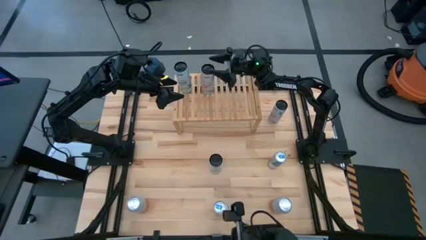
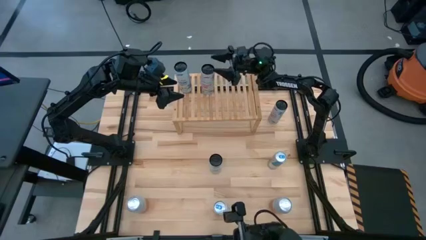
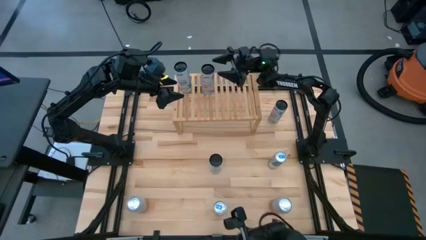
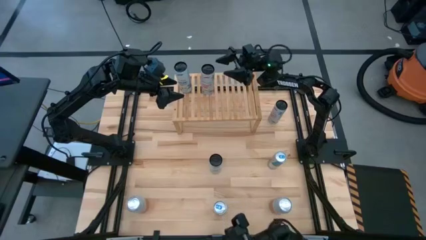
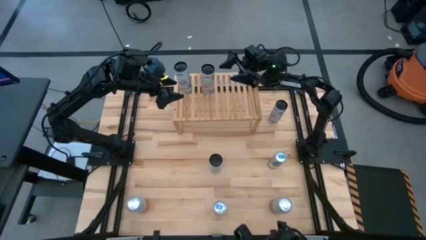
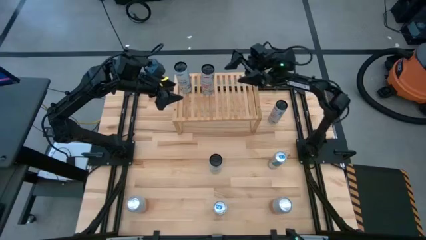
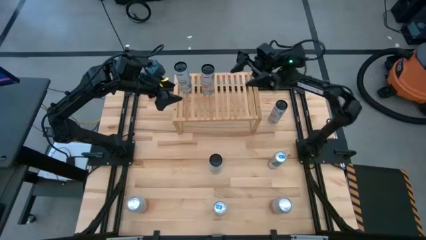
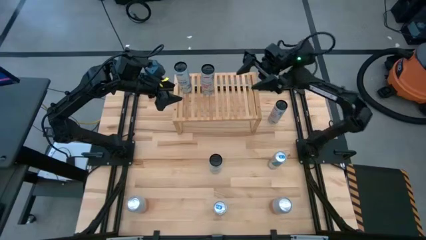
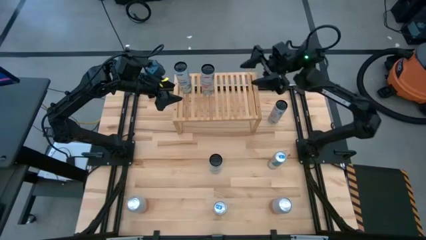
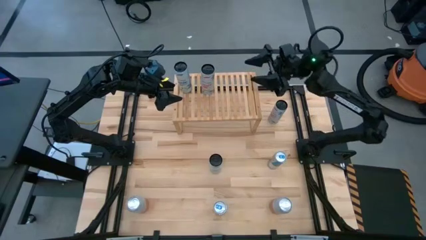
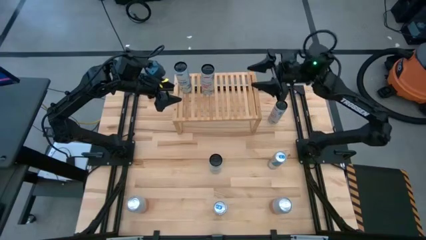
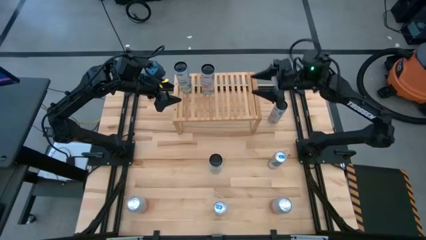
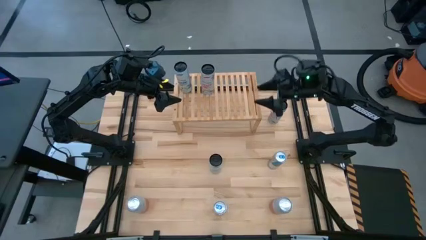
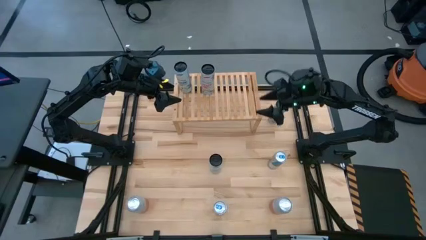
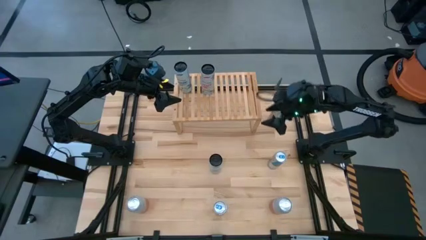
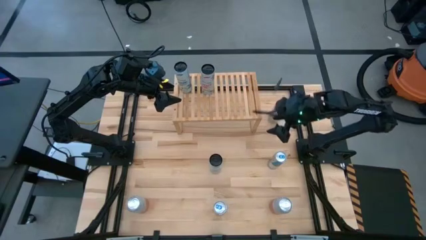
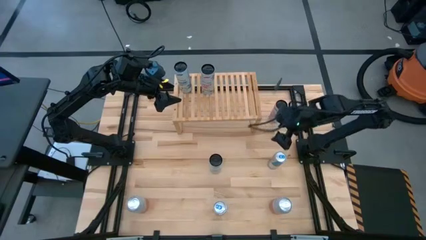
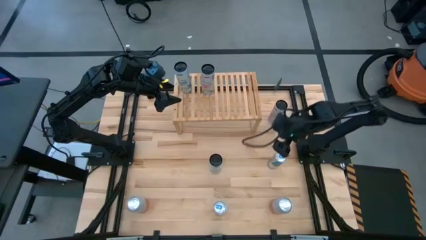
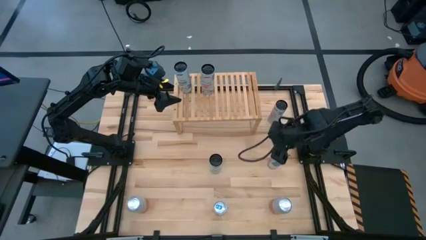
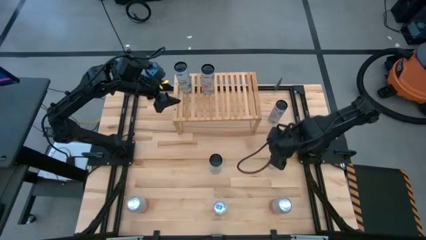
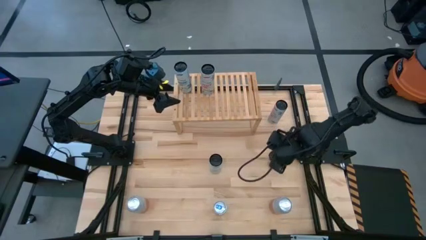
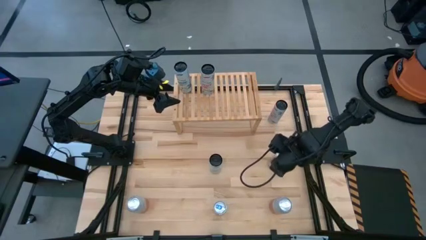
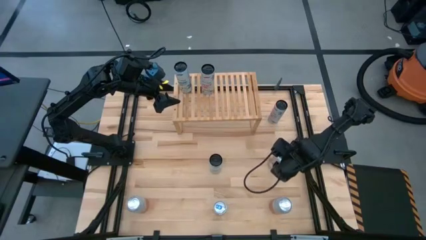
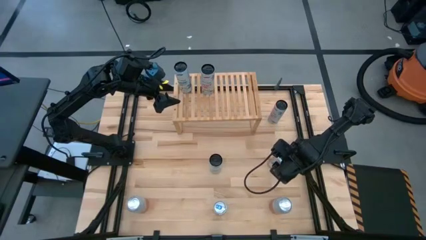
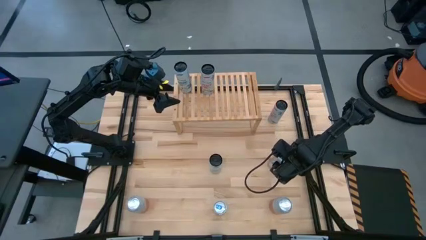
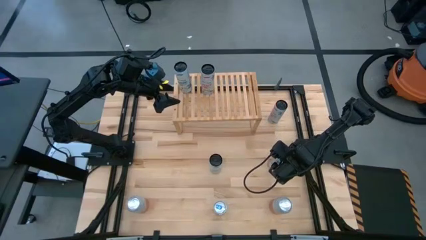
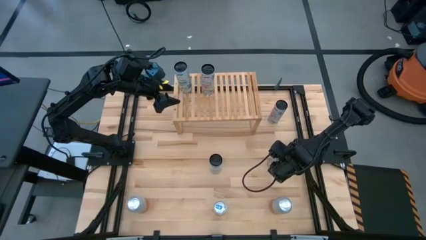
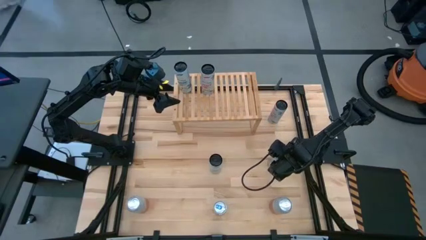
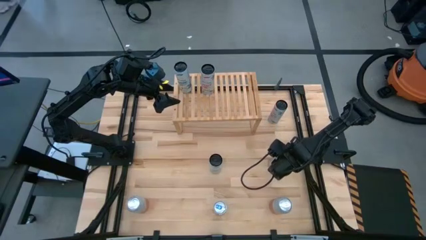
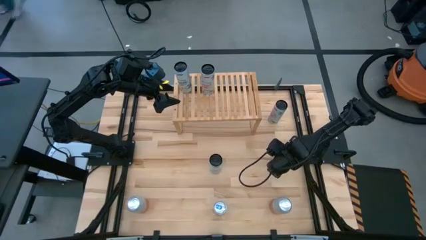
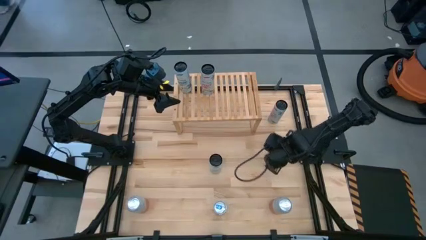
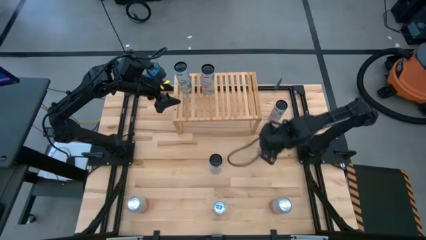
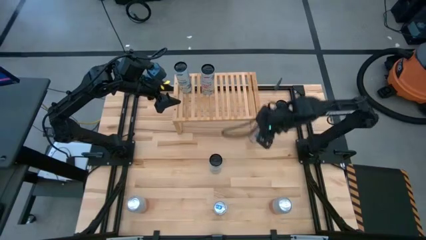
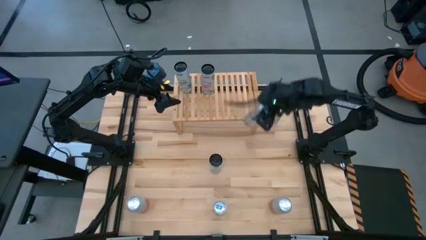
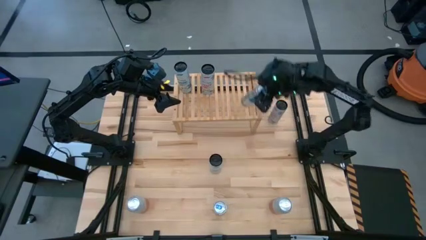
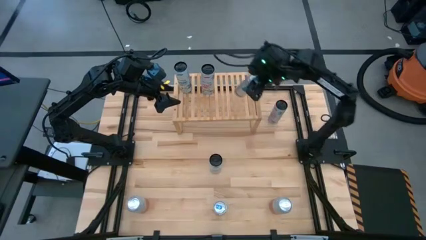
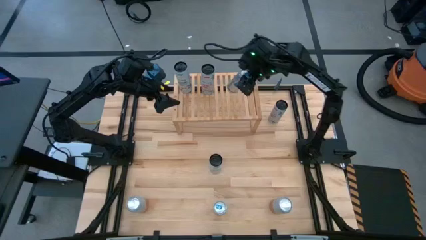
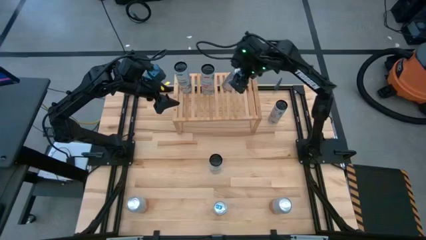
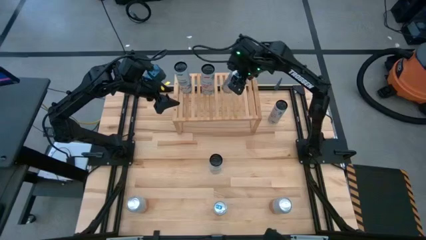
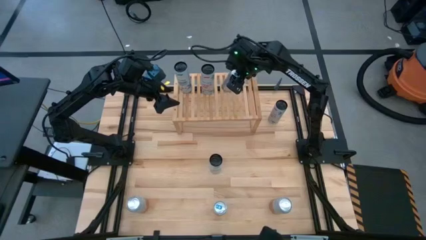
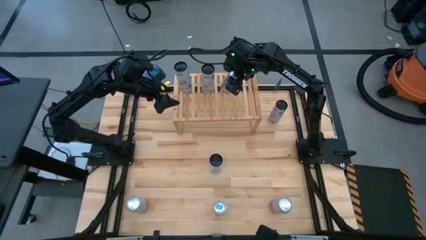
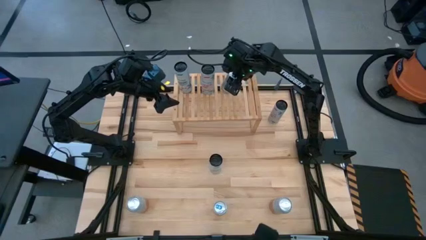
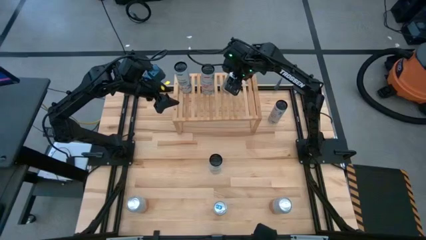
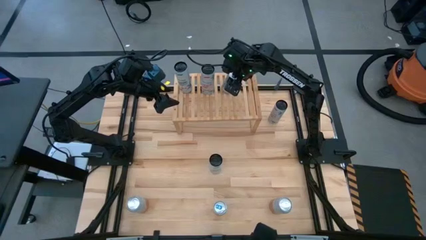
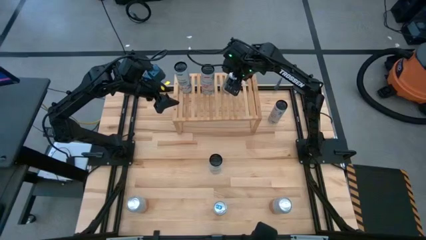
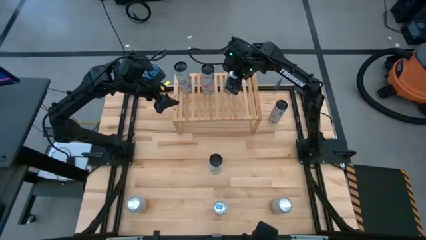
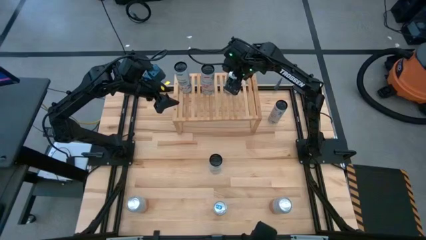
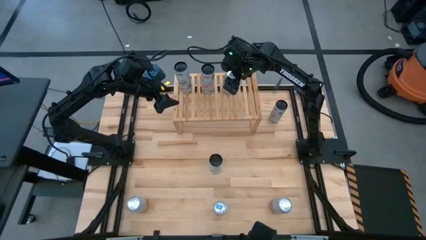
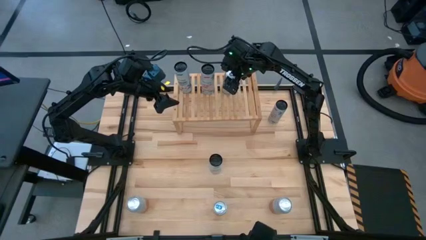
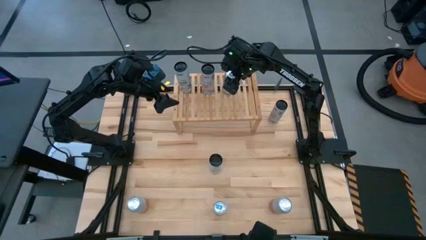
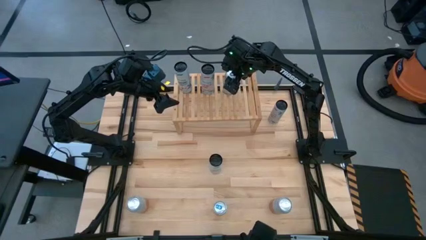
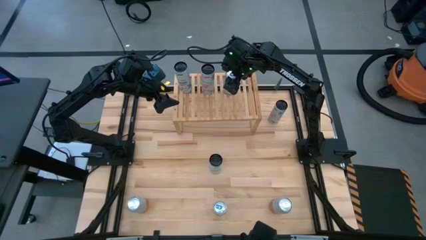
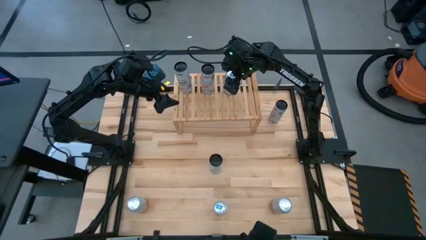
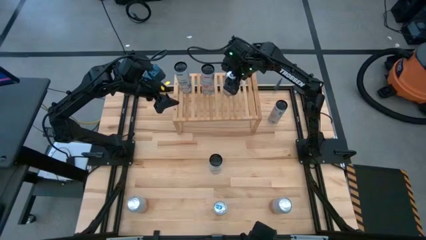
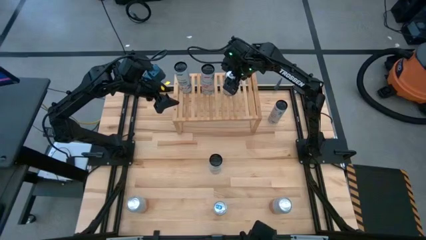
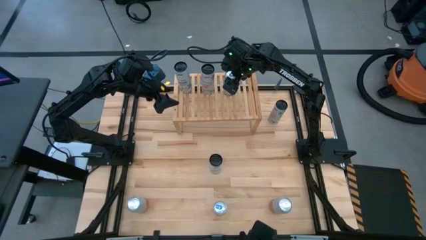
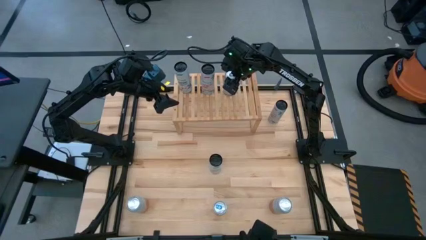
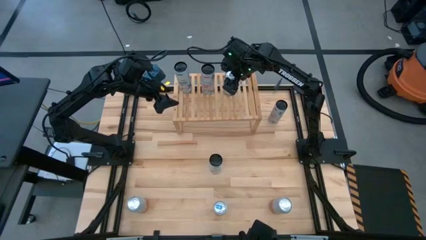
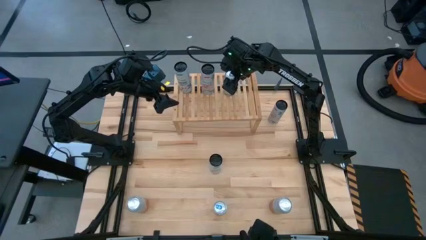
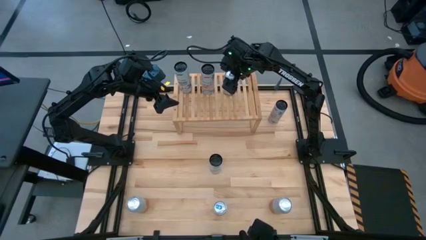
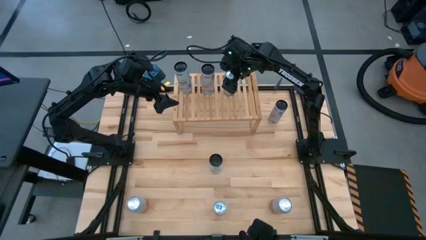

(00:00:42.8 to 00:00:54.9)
Task: Place canned beverage on shelf
Put the blue soda can on the shelf aligned with the other blue soda can

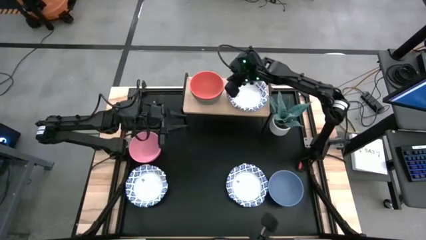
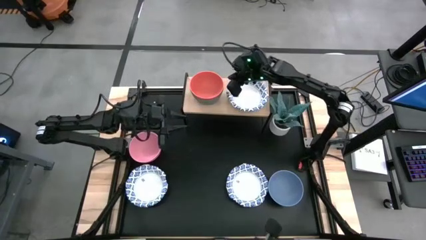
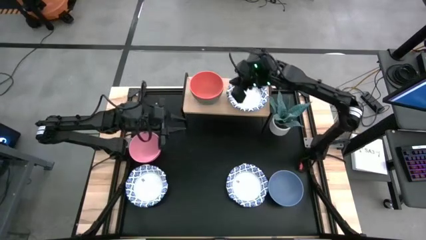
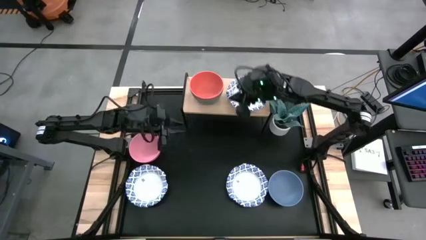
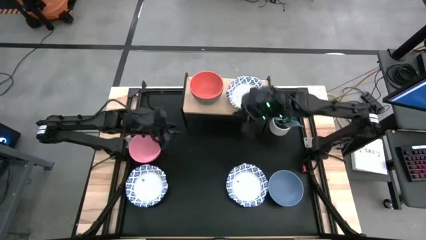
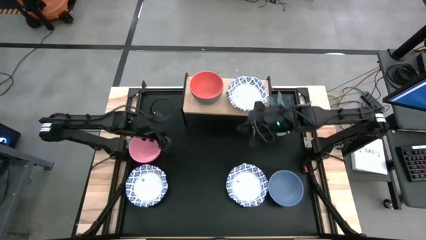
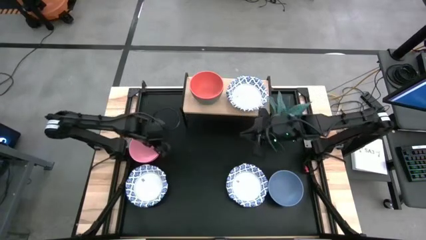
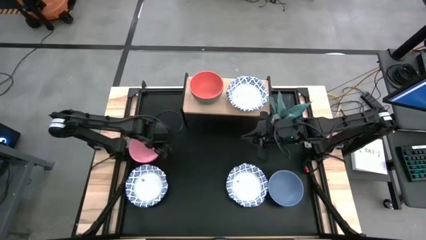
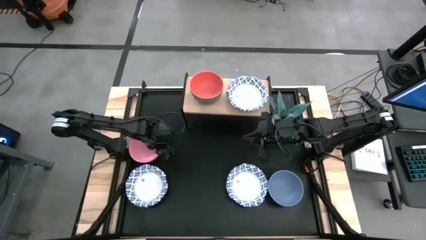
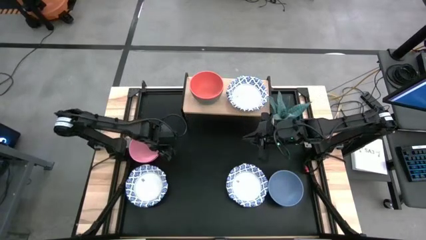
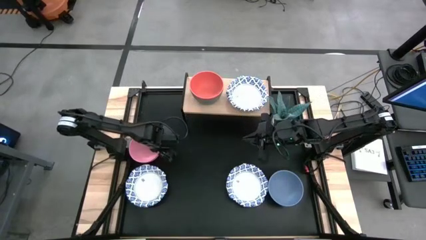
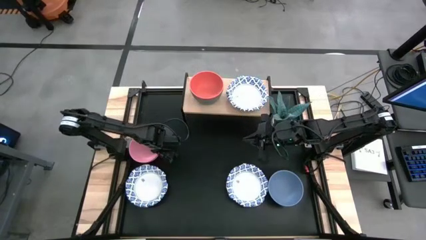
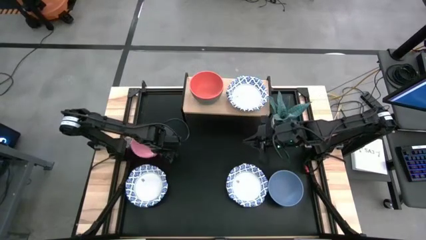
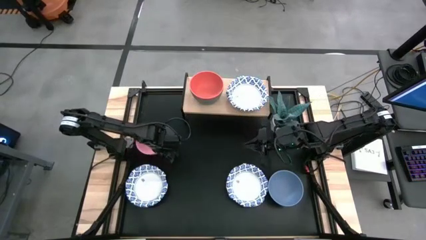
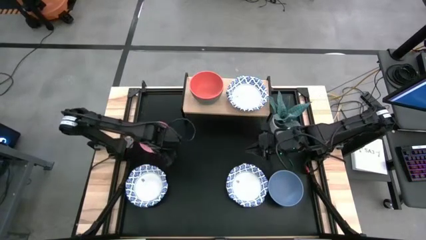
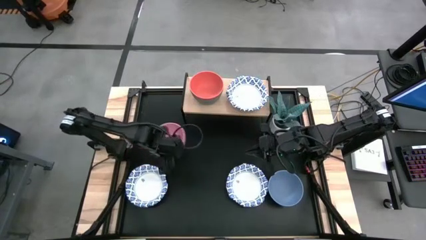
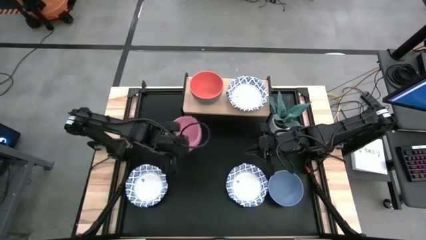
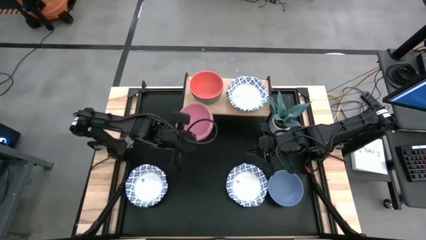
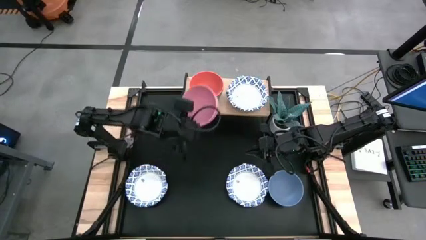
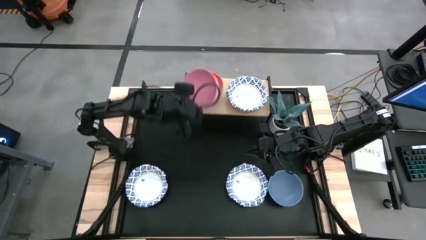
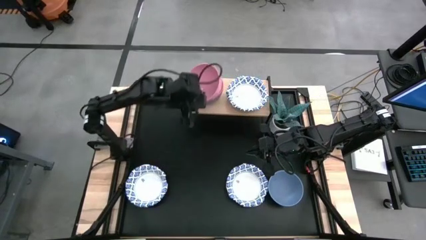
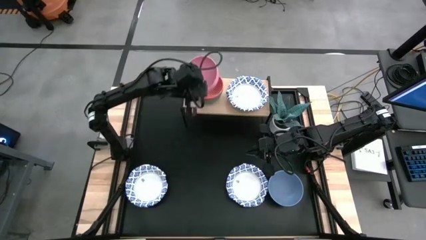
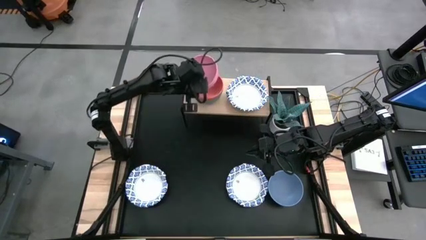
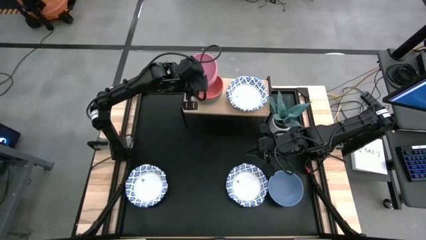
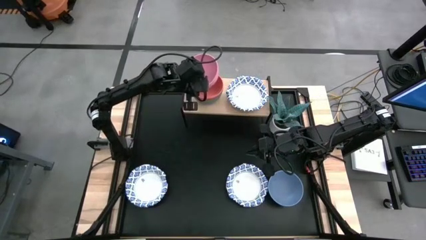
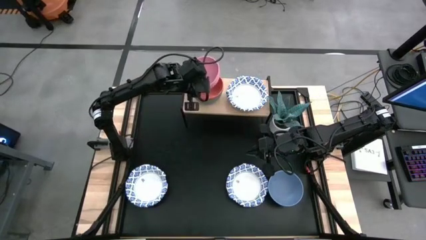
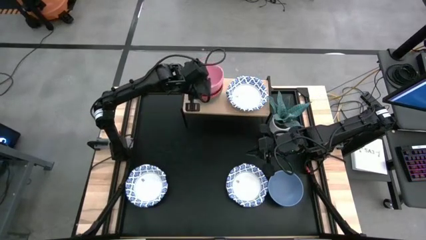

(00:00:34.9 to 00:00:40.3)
Task: Place and stack bowls onto a shelf
Stack the pink bowl on top of the orange bowl on the shelf
